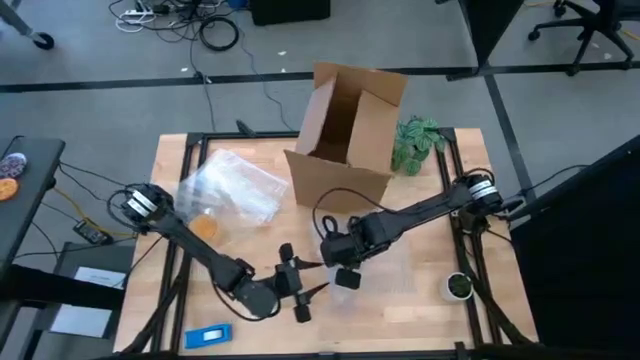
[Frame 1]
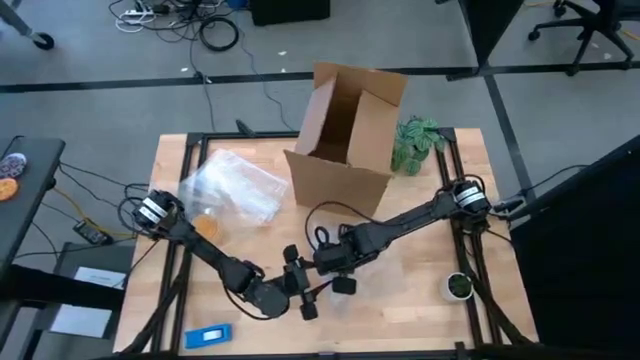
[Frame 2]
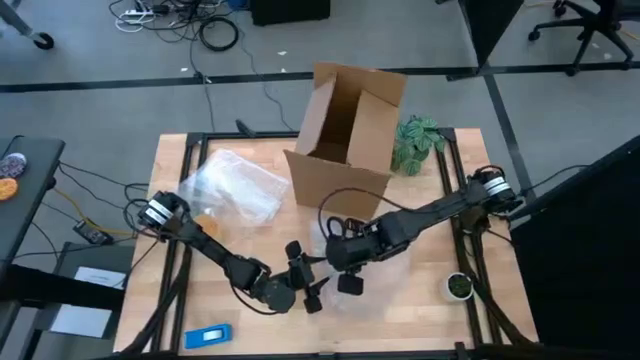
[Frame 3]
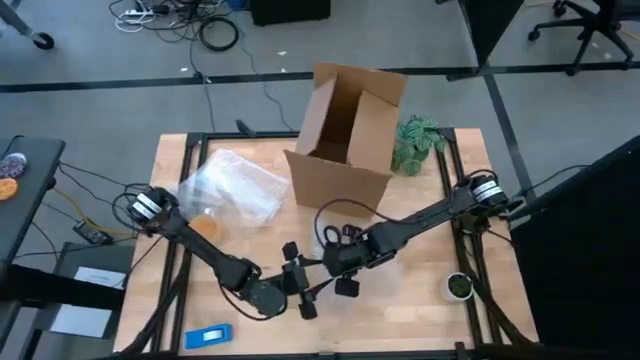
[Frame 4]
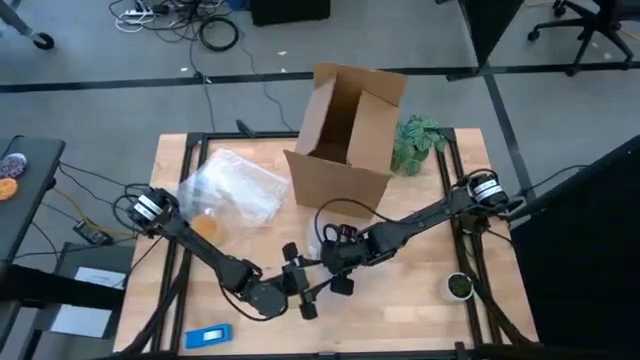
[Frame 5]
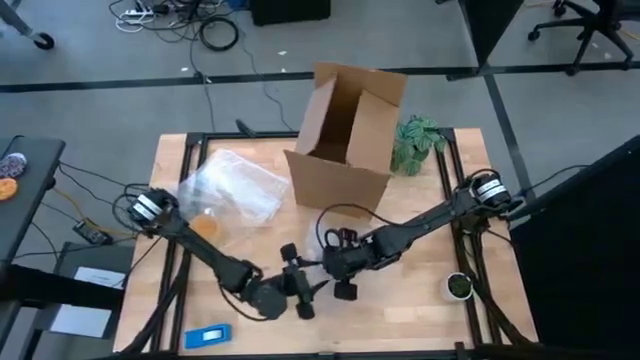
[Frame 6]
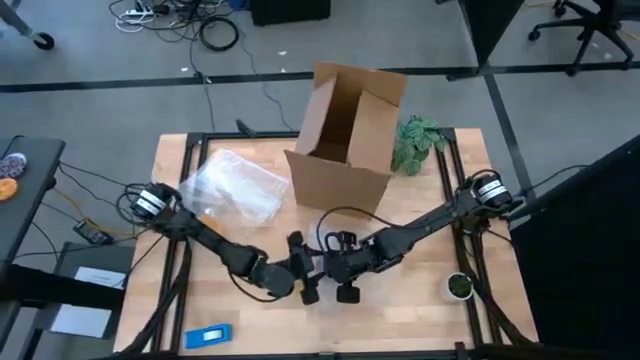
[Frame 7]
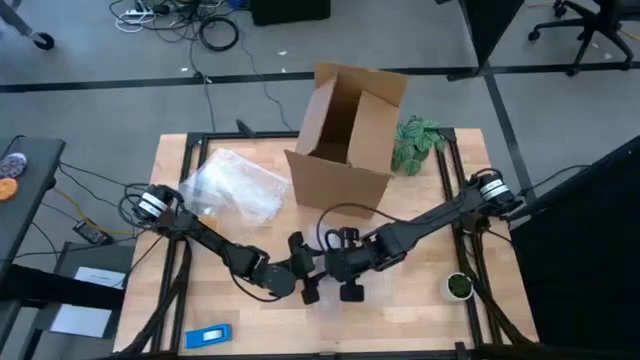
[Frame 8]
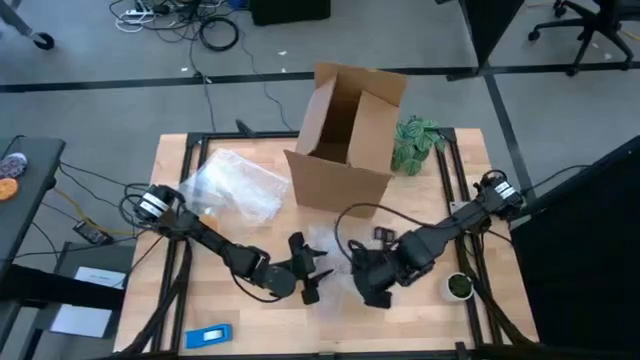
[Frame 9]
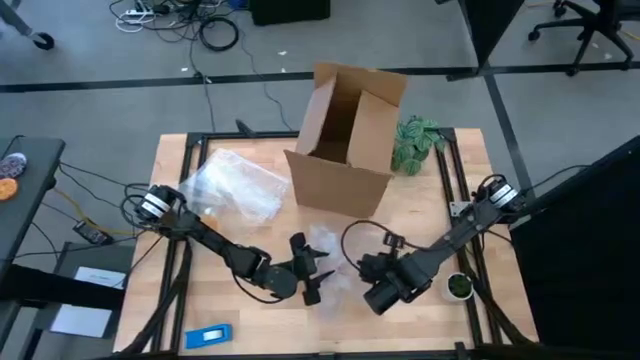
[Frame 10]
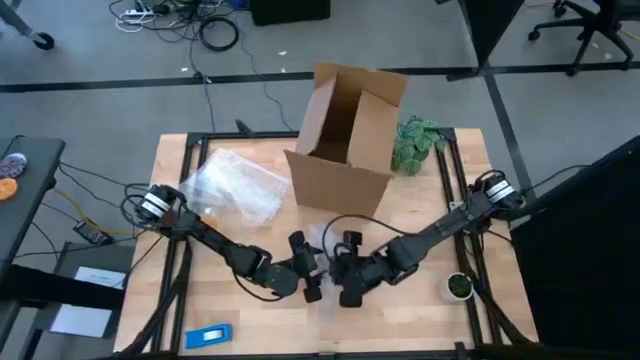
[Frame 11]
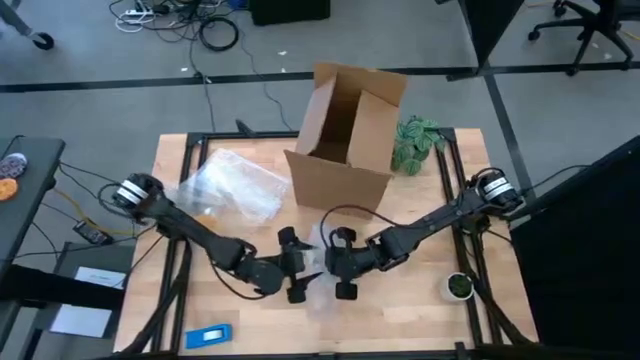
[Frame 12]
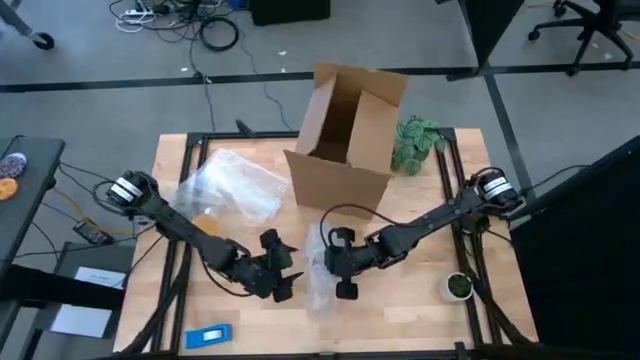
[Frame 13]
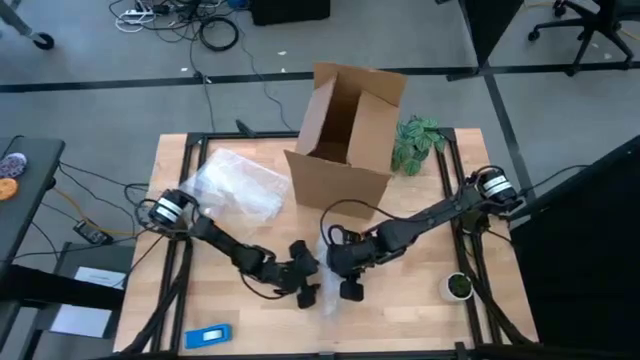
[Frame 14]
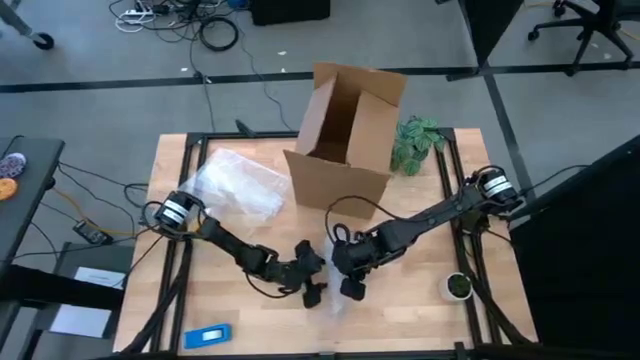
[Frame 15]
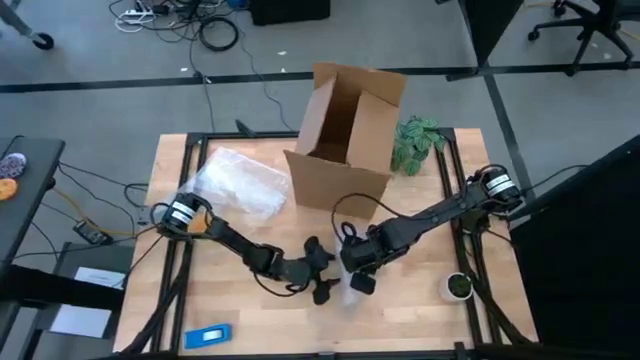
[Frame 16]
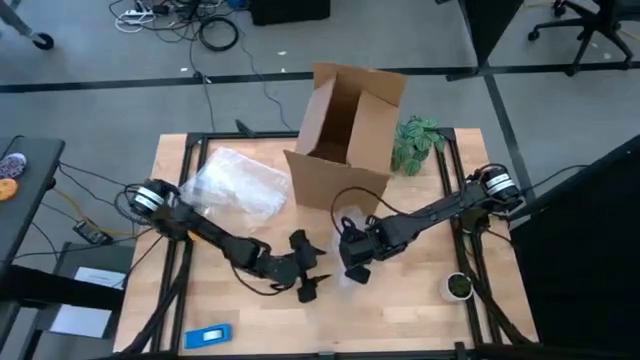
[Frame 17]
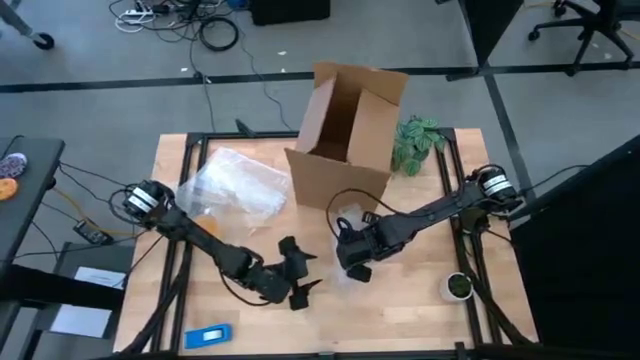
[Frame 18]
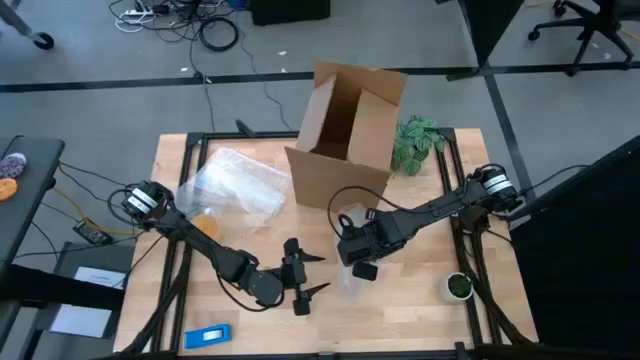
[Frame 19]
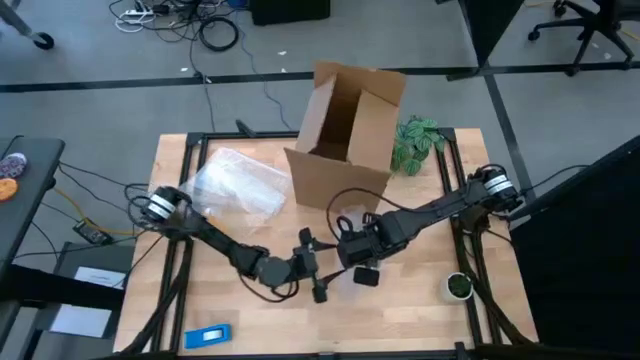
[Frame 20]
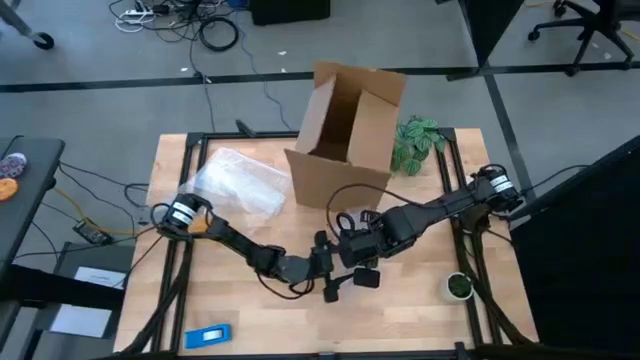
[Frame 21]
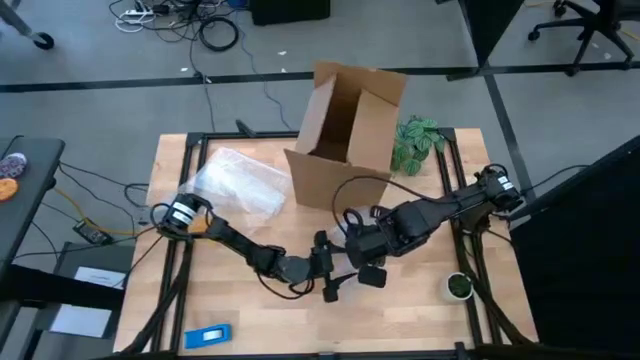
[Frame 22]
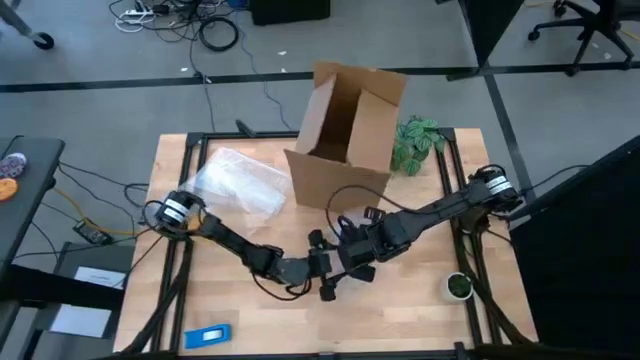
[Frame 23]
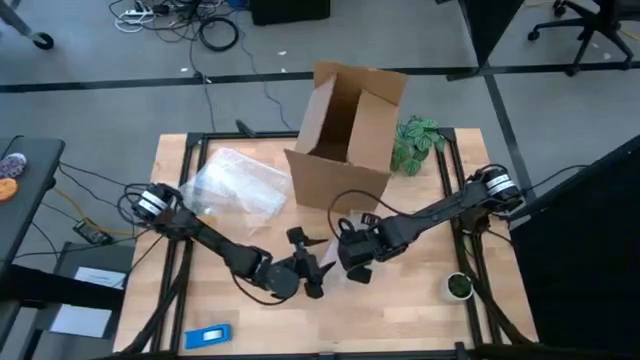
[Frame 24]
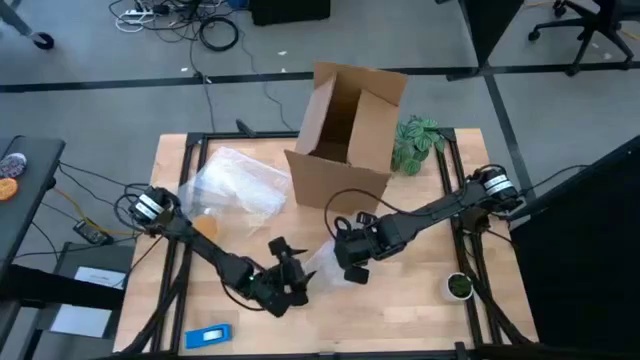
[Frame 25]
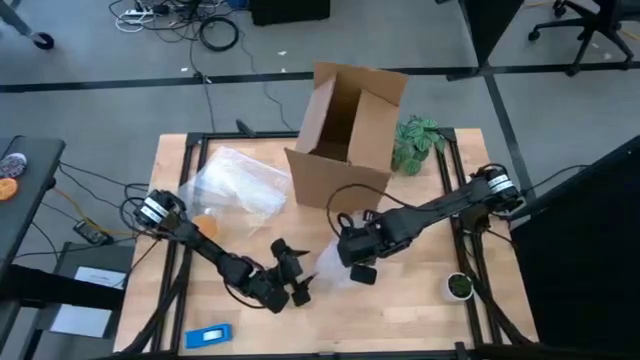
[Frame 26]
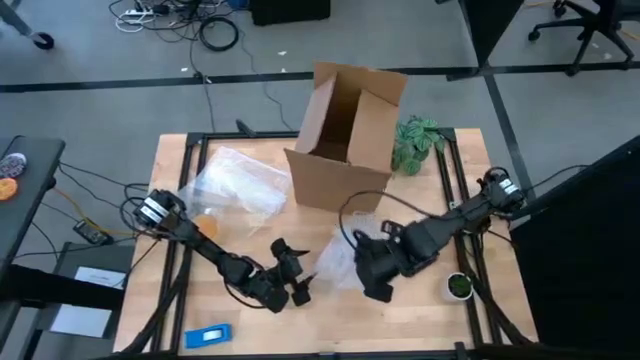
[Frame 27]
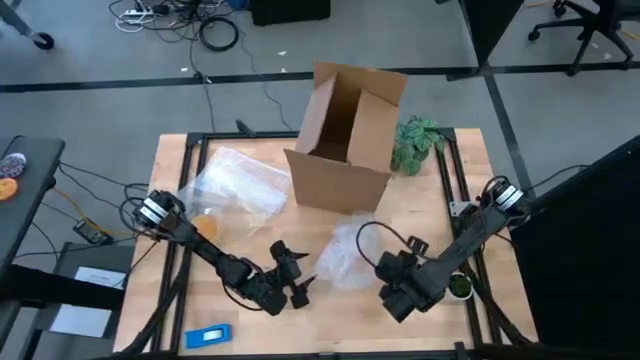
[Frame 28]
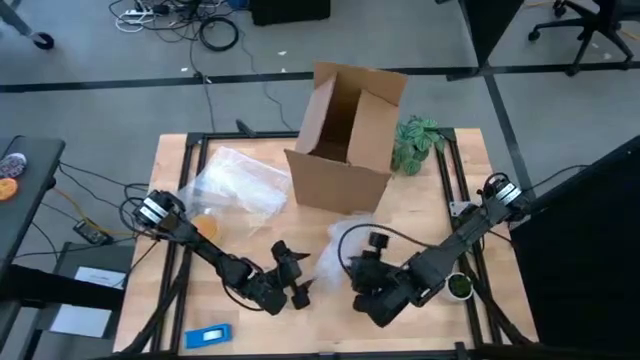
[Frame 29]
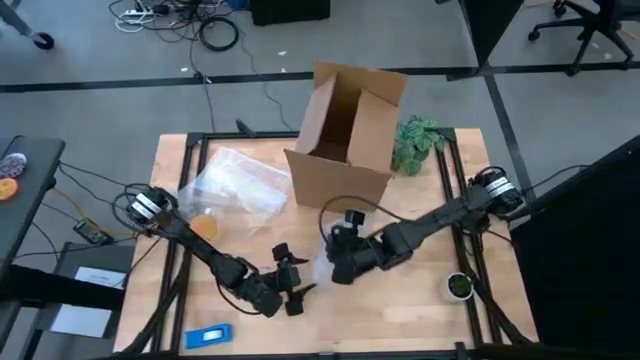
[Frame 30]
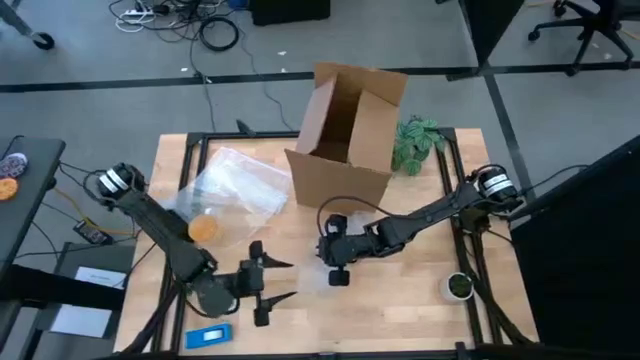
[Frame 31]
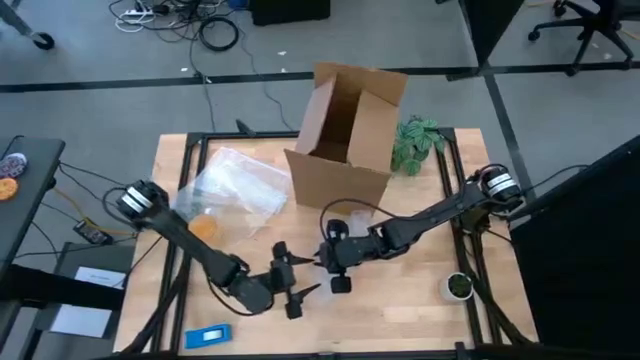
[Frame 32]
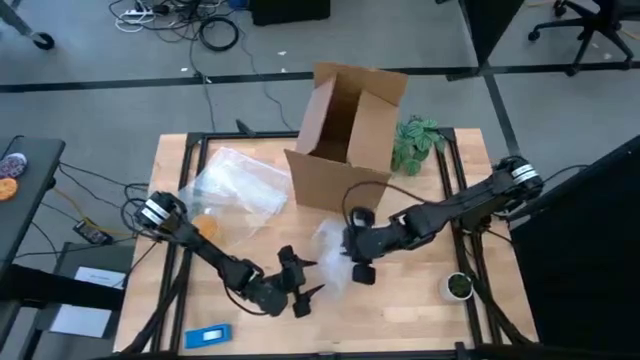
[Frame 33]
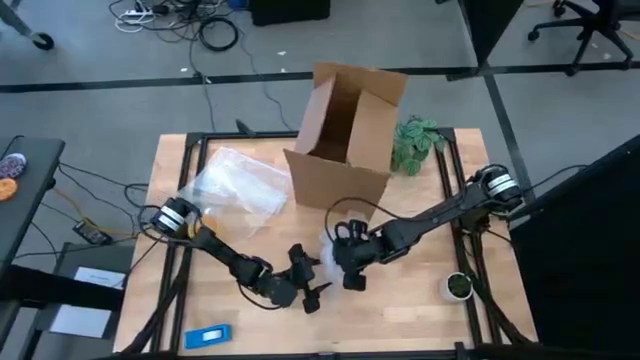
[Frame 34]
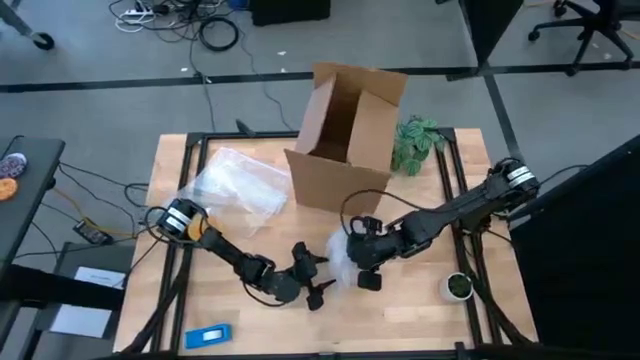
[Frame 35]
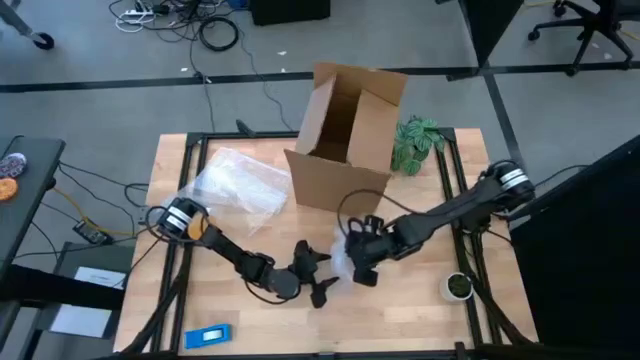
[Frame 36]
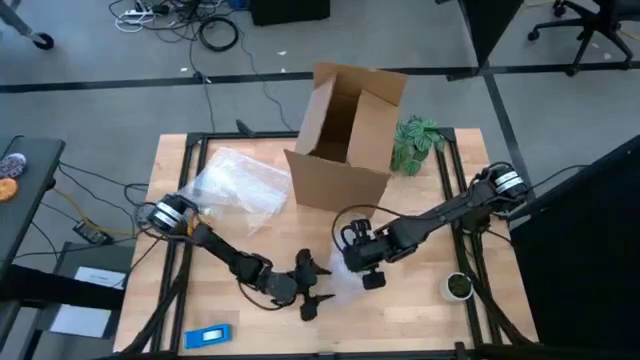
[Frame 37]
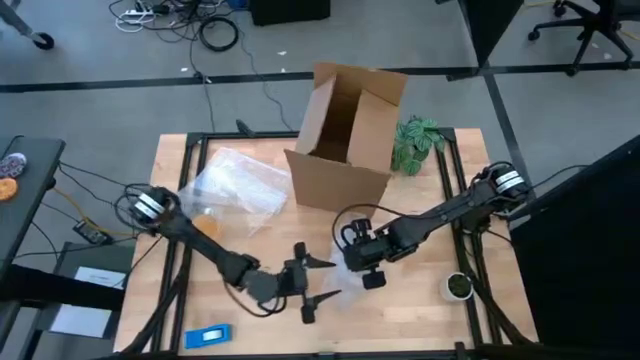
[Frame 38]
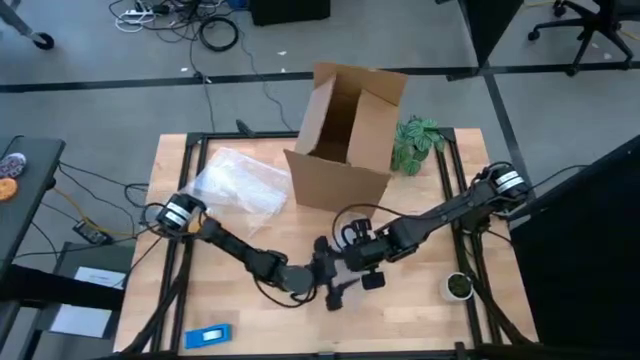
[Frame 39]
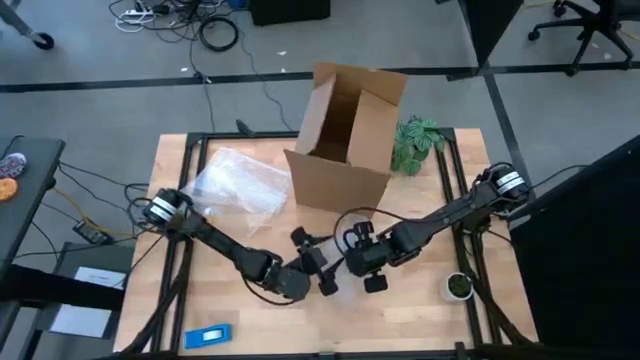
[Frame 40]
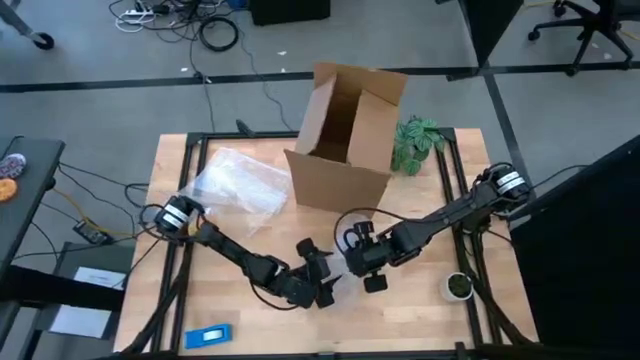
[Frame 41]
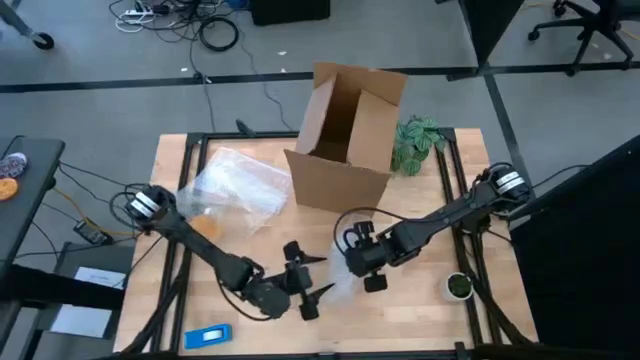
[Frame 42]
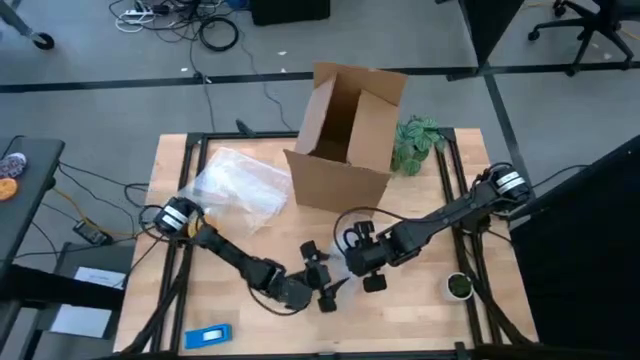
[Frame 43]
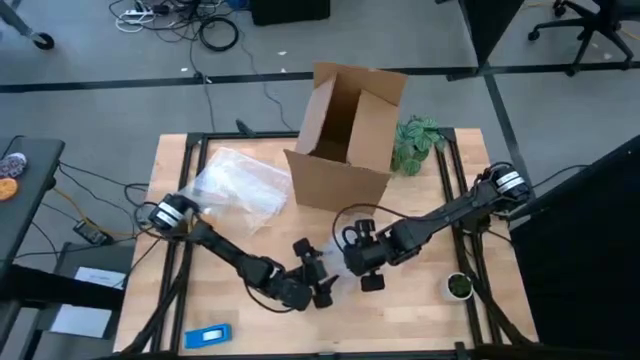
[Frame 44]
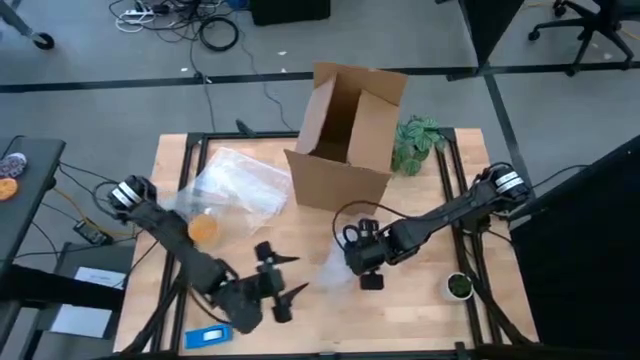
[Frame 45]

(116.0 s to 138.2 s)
Task: wrap mug
Wrap the orange mug with transparent bubble wrap
